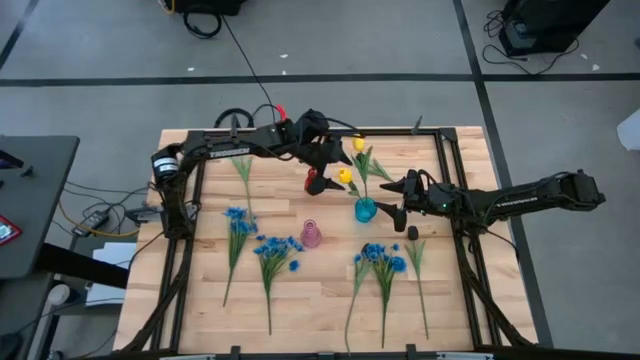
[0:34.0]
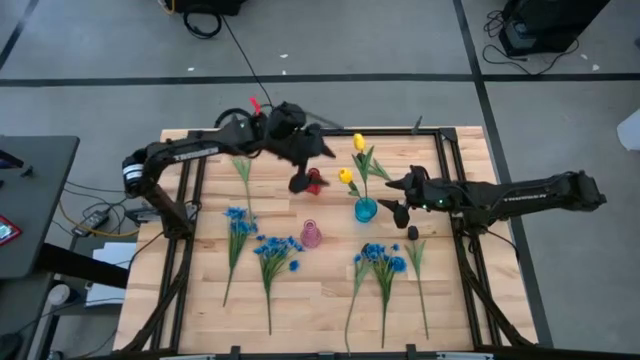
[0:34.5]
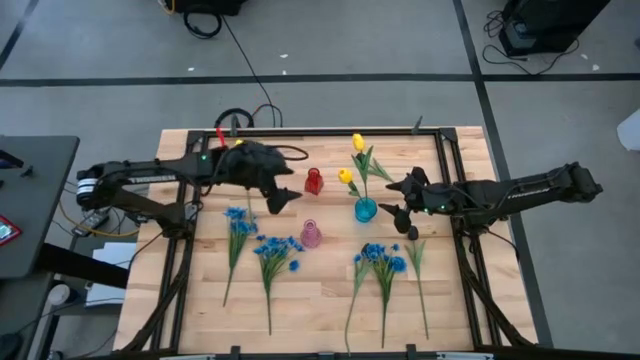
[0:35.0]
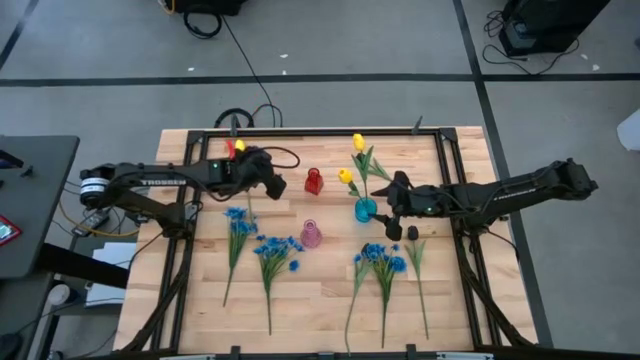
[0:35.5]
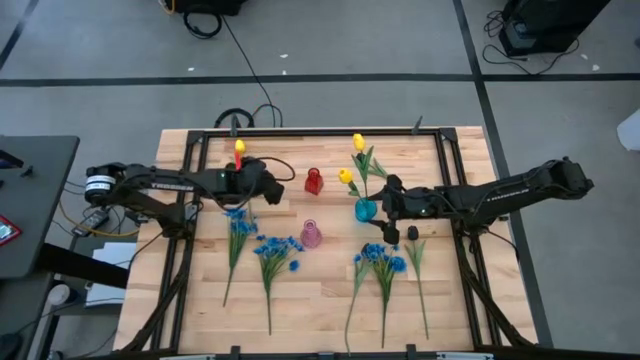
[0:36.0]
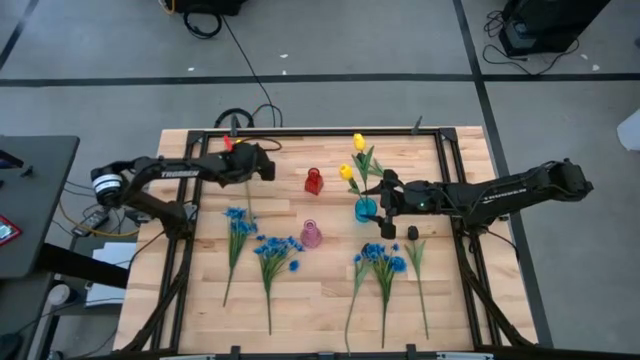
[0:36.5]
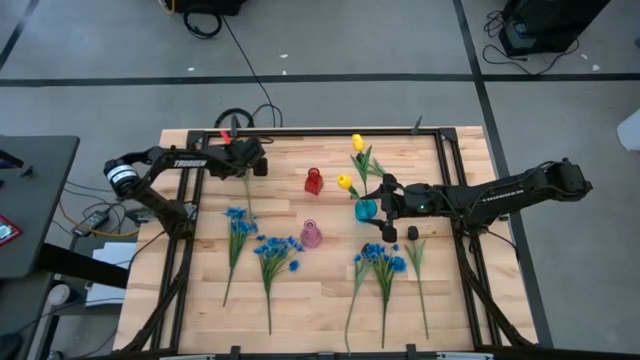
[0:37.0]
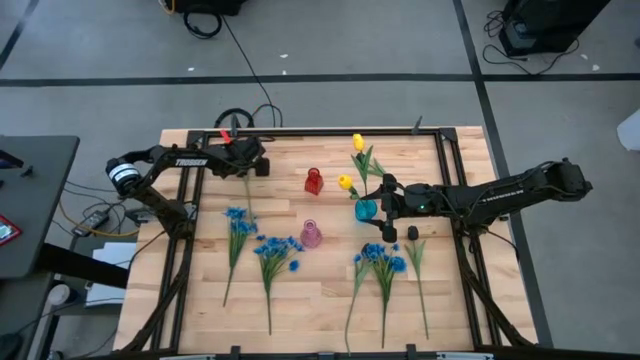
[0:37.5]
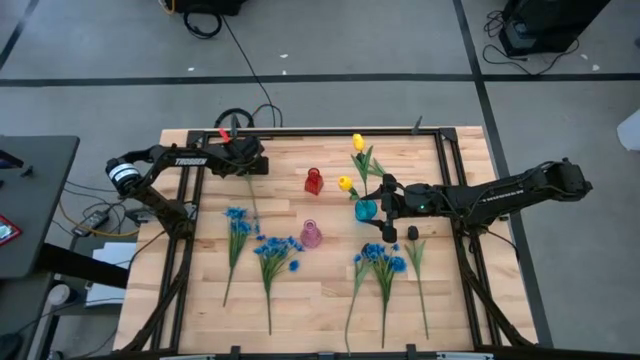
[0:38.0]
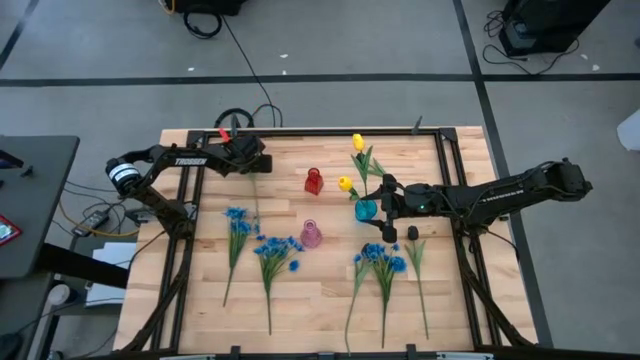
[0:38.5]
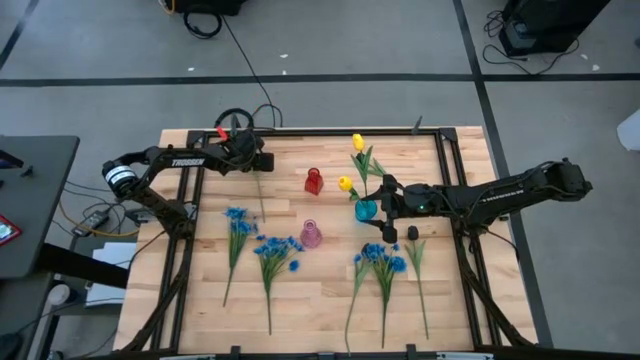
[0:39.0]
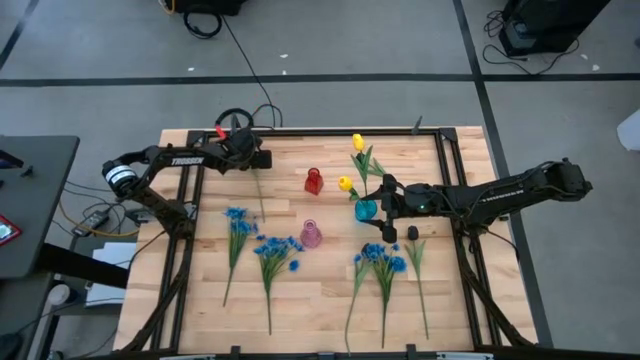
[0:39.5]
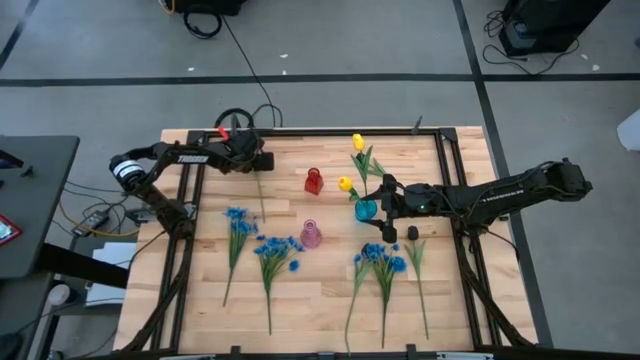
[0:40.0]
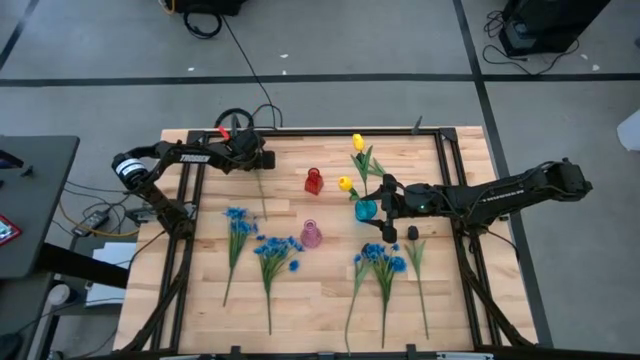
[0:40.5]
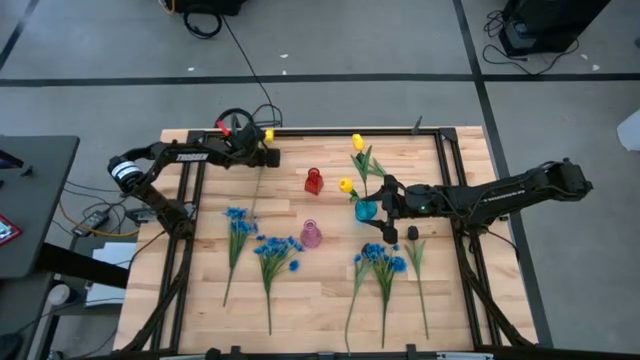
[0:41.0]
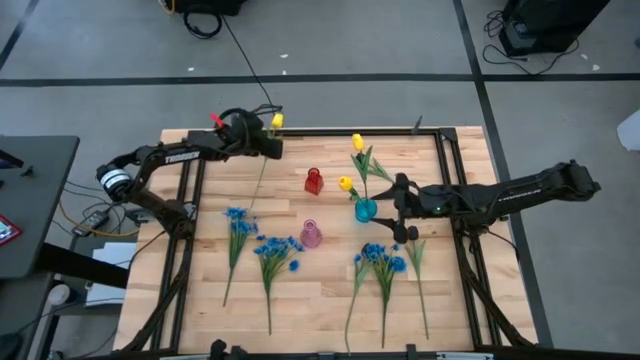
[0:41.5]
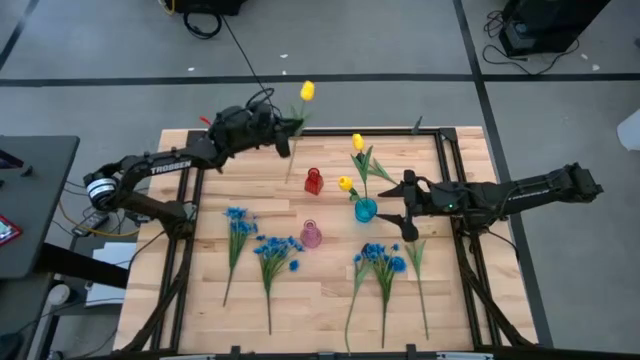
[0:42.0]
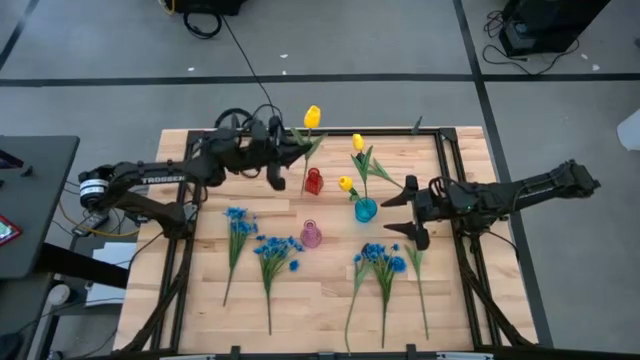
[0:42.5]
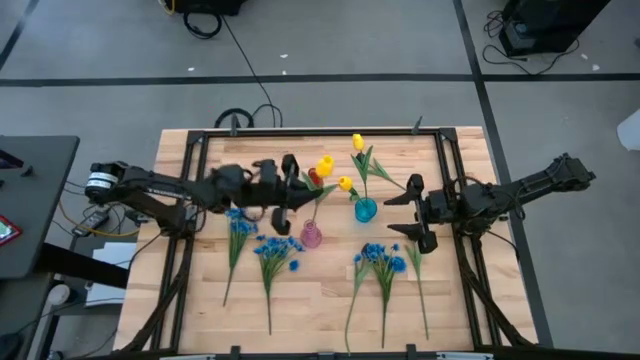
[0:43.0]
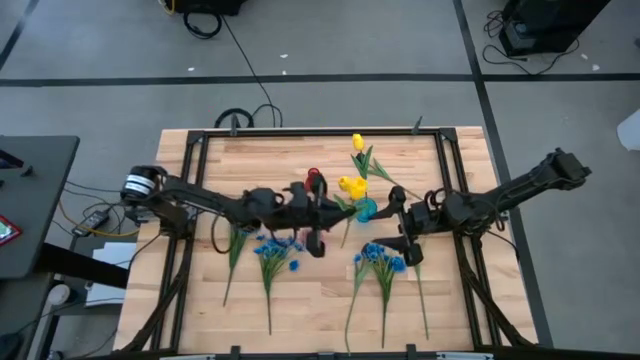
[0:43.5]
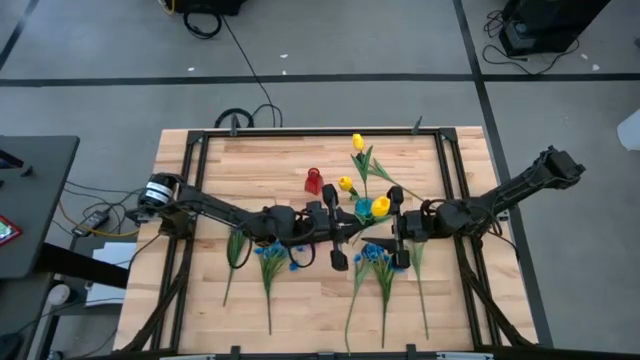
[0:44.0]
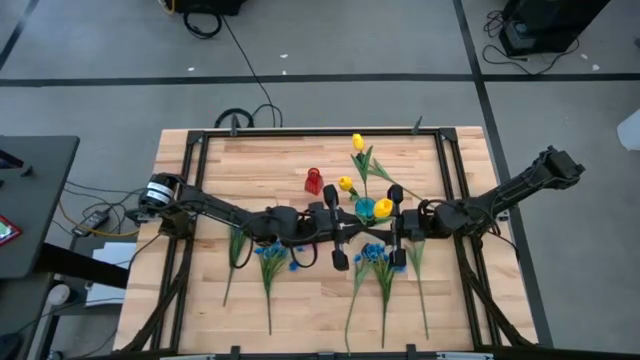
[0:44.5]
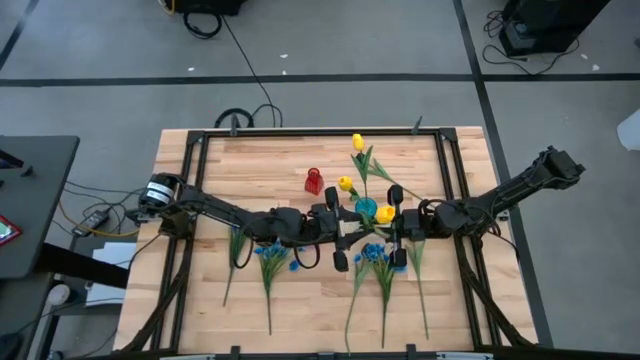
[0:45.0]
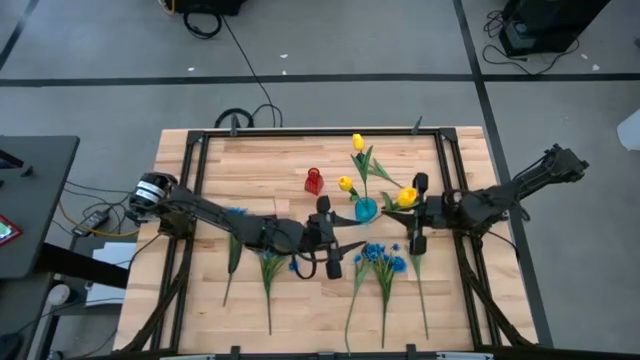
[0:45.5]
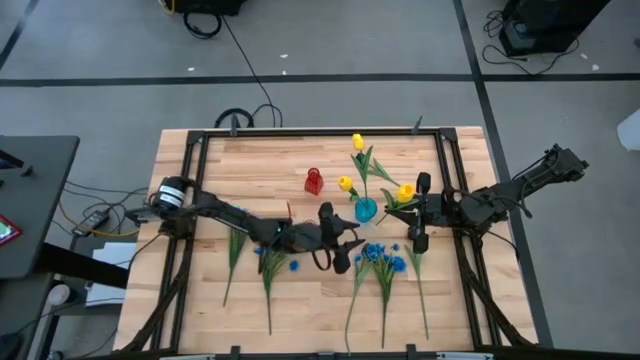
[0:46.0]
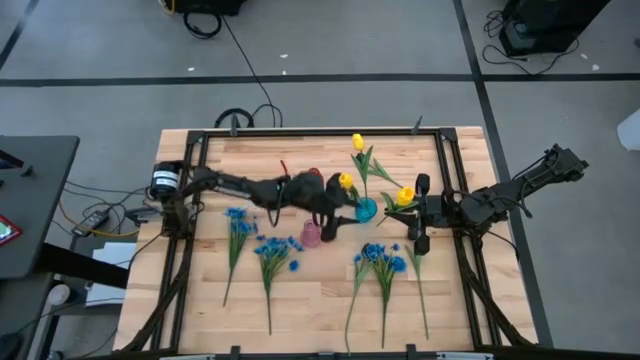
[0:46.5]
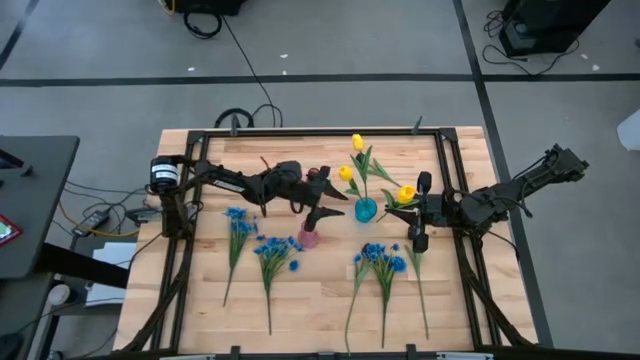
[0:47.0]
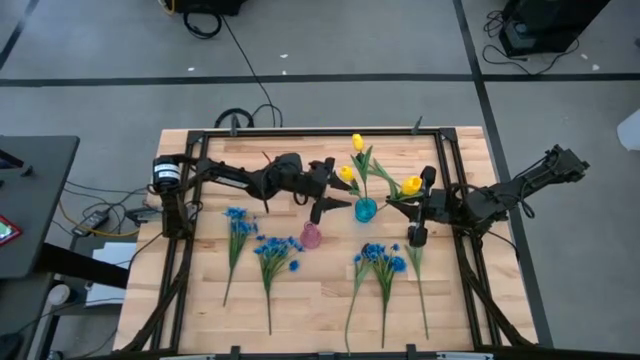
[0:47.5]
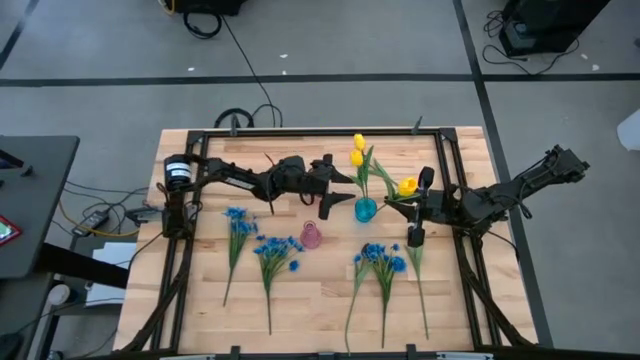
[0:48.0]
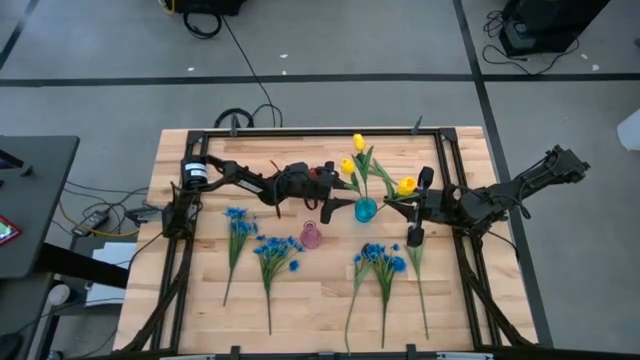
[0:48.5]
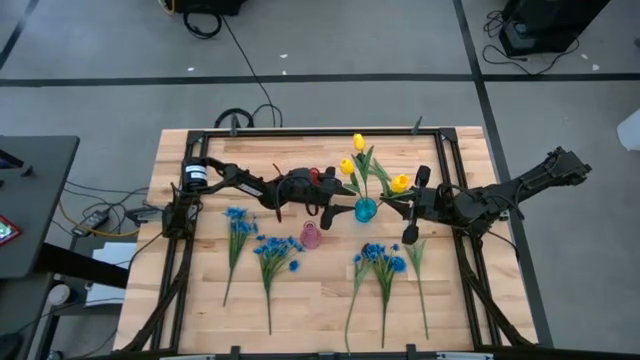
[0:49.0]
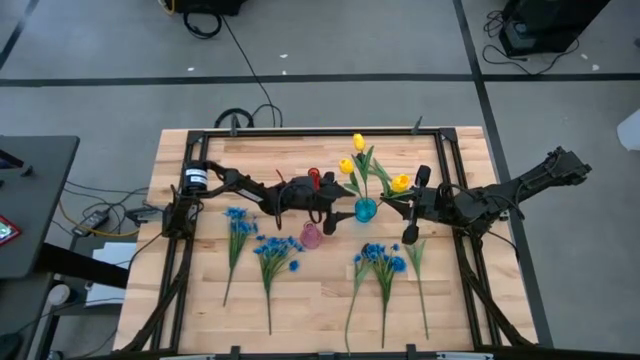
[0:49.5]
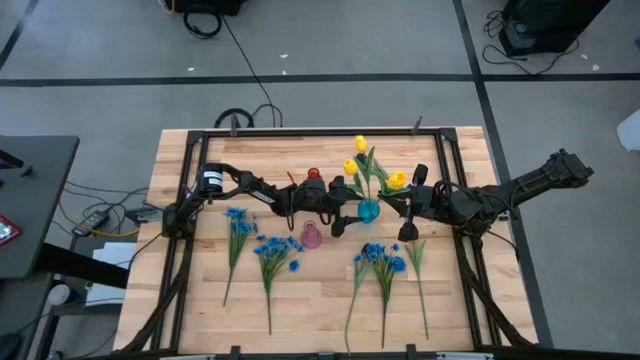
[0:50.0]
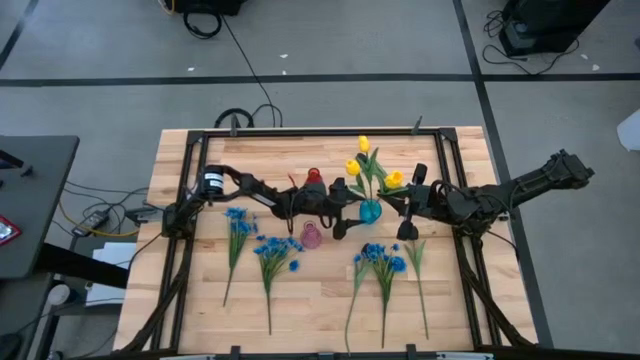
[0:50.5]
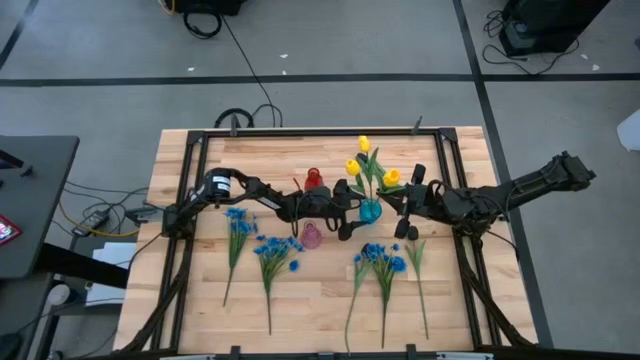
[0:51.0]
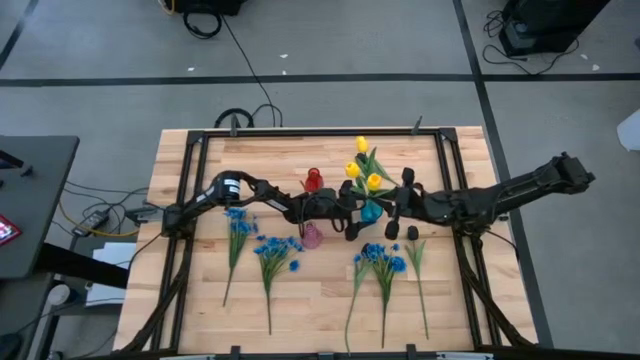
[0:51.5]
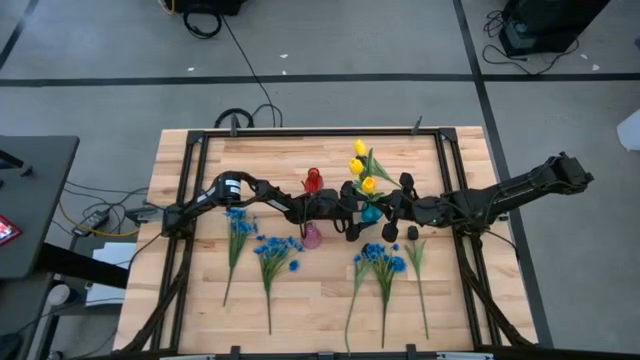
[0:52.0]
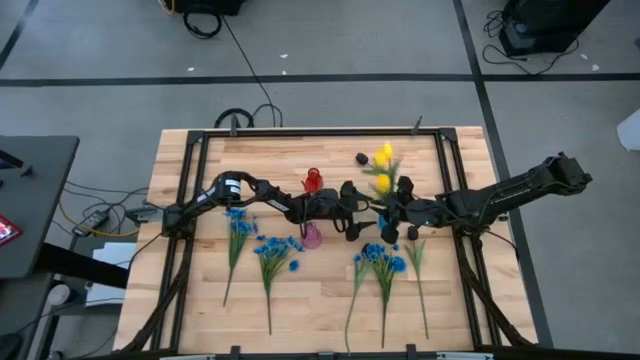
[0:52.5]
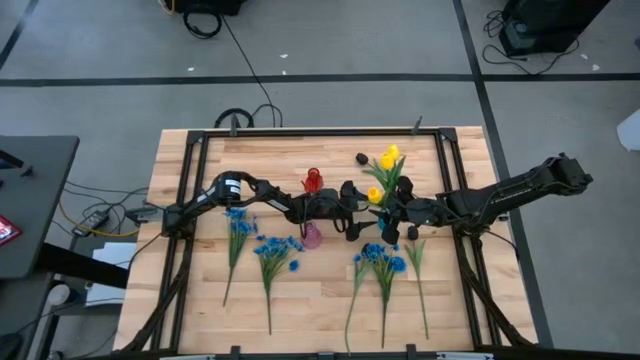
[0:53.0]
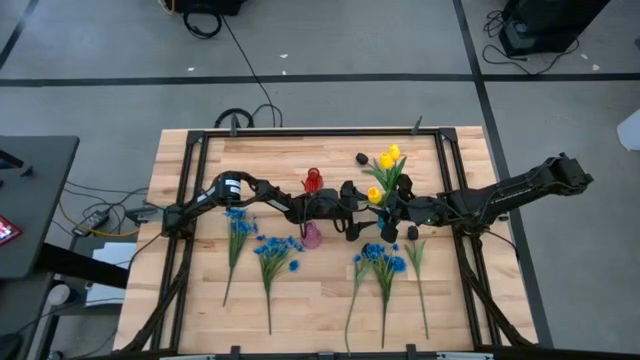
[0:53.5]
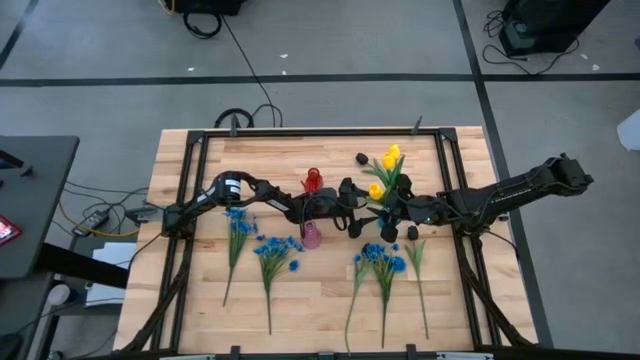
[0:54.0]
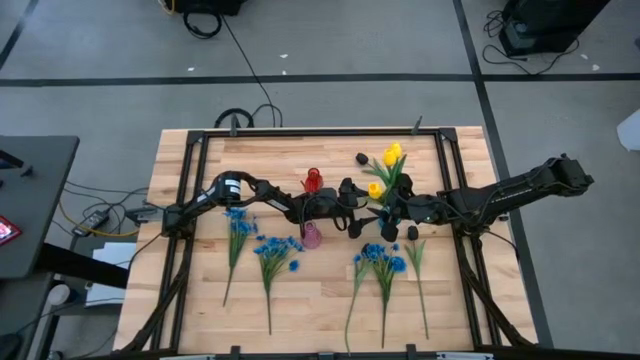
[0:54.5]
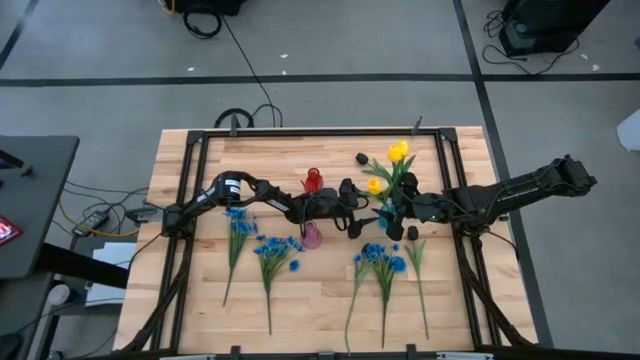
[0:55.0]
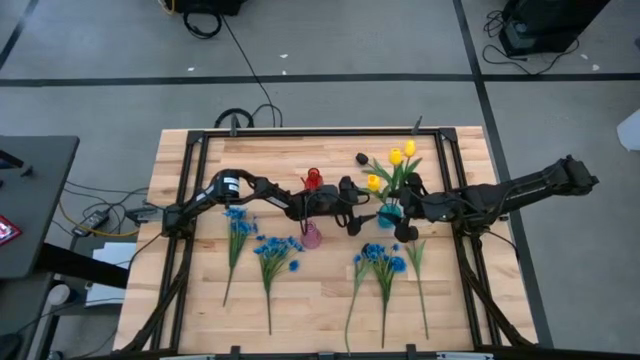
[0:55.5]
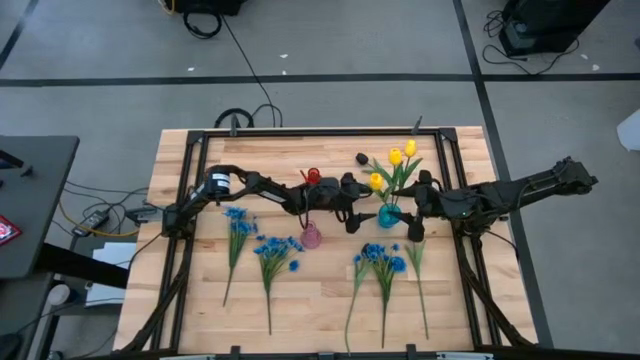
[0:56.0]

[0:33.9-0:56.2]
Task: Sort flowers into vase by color
Put the yellow flower into the blue vase
